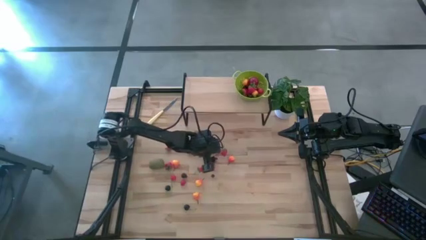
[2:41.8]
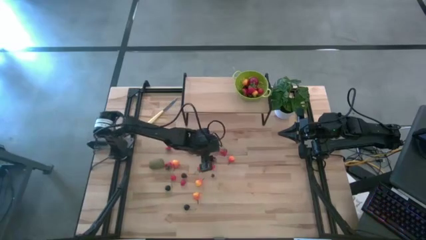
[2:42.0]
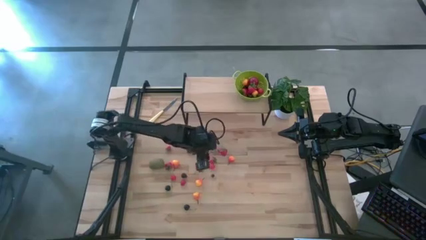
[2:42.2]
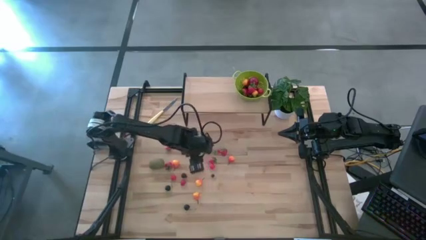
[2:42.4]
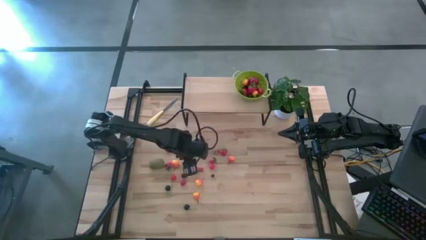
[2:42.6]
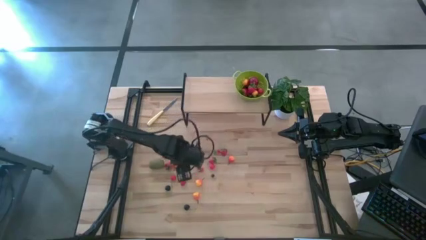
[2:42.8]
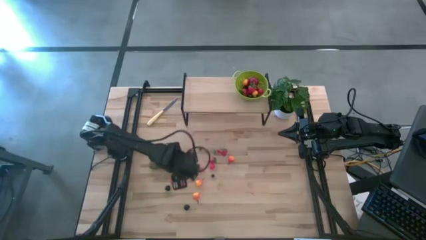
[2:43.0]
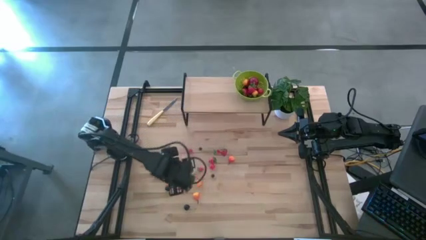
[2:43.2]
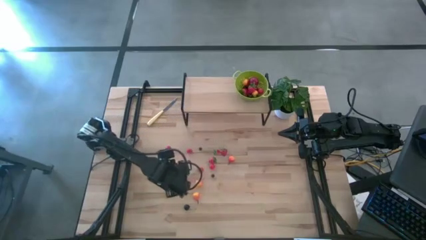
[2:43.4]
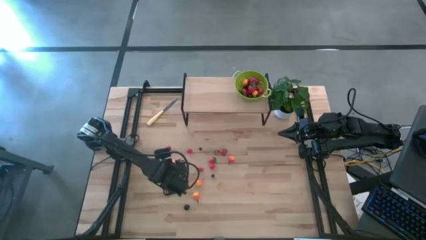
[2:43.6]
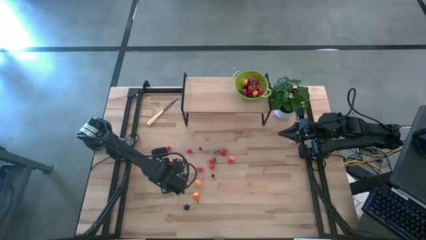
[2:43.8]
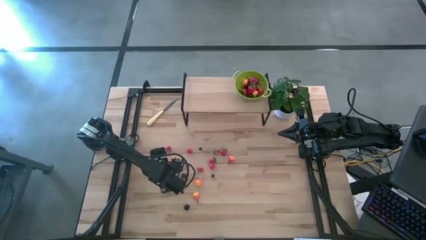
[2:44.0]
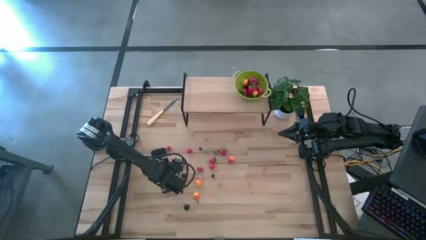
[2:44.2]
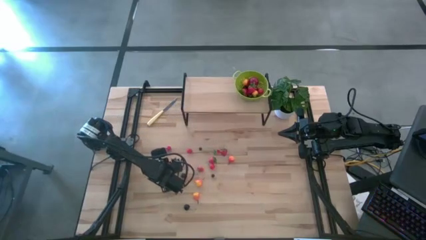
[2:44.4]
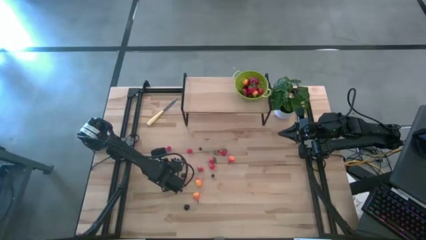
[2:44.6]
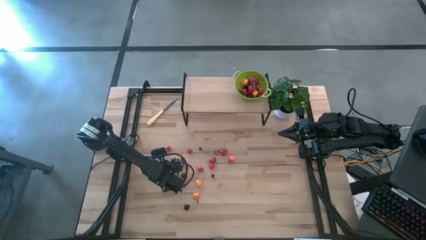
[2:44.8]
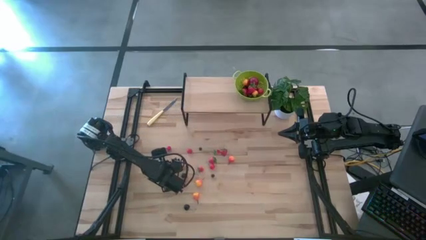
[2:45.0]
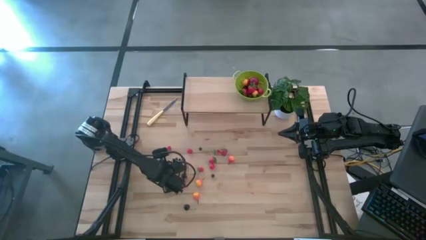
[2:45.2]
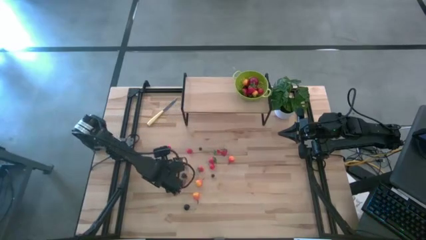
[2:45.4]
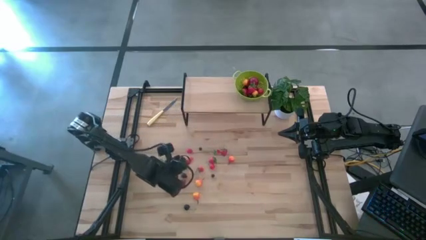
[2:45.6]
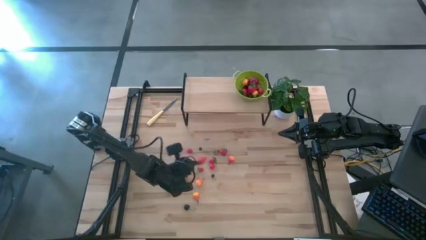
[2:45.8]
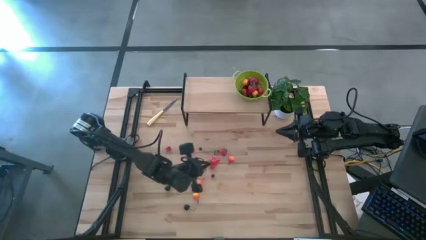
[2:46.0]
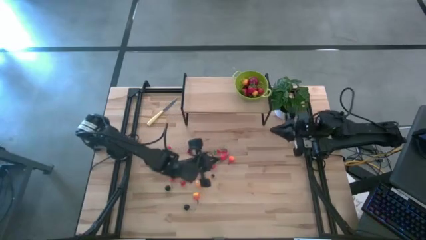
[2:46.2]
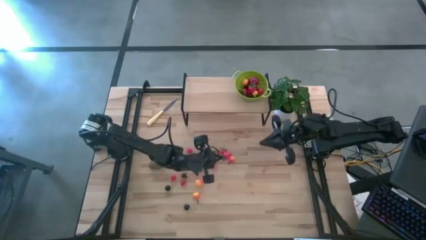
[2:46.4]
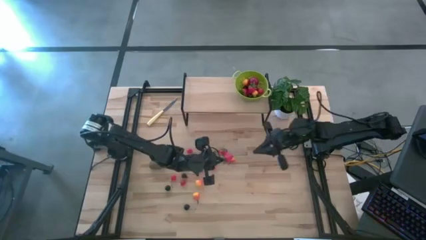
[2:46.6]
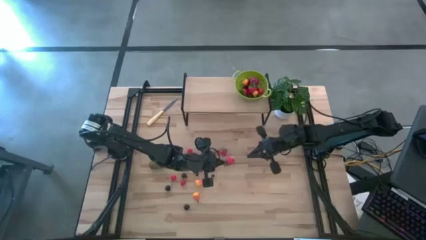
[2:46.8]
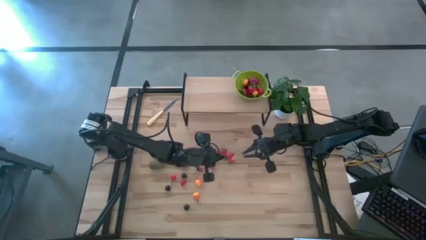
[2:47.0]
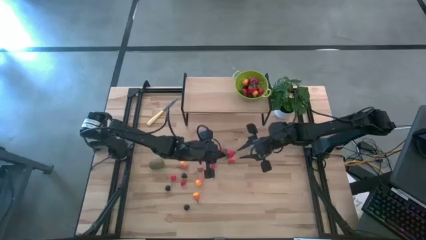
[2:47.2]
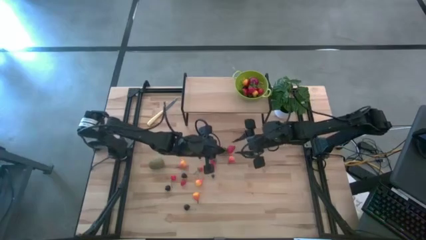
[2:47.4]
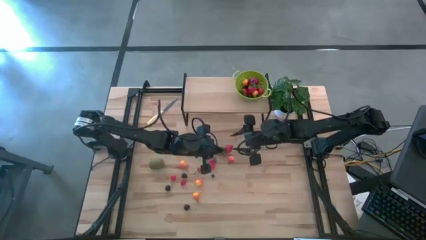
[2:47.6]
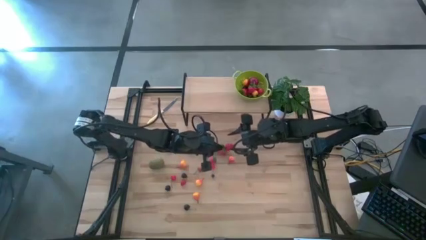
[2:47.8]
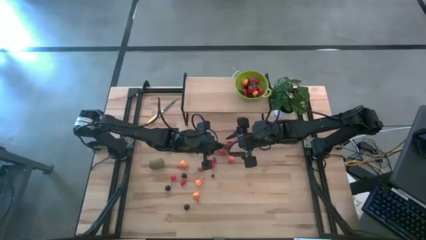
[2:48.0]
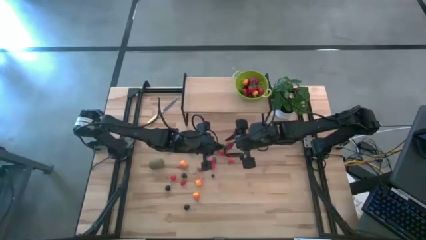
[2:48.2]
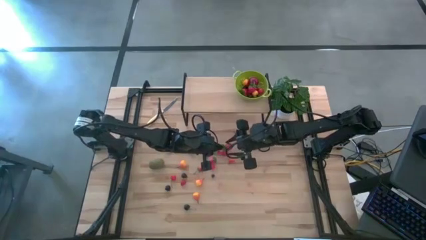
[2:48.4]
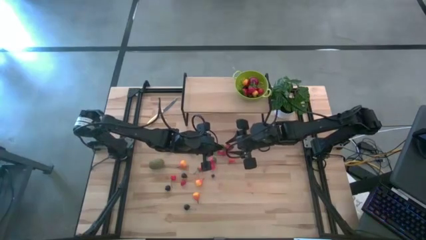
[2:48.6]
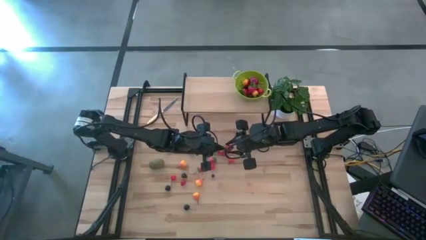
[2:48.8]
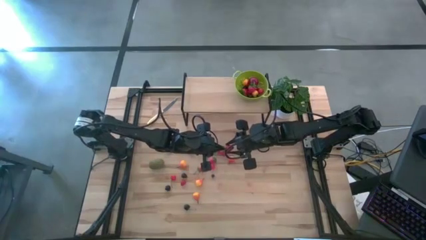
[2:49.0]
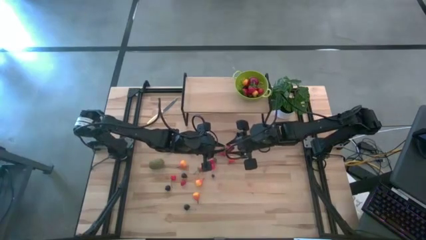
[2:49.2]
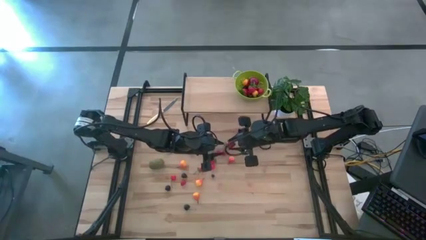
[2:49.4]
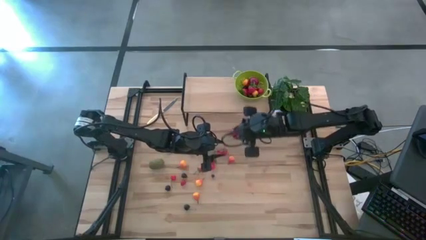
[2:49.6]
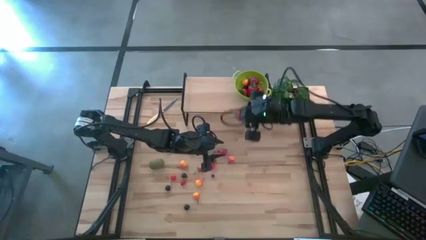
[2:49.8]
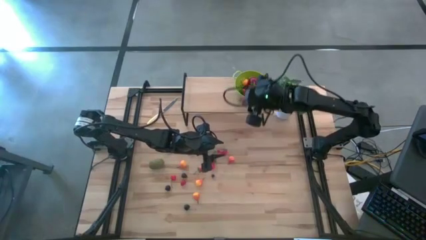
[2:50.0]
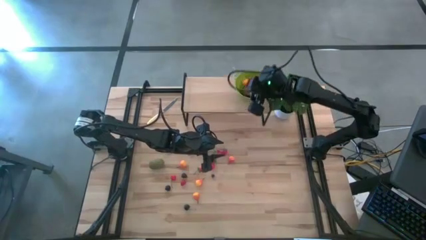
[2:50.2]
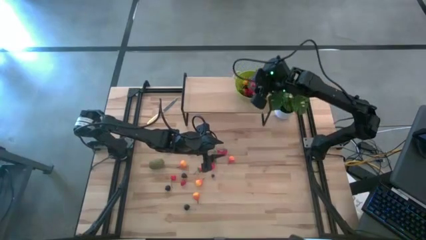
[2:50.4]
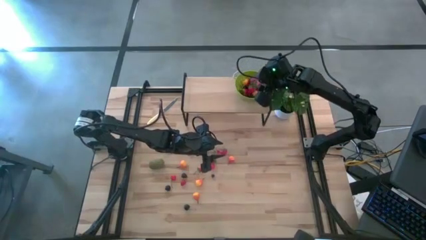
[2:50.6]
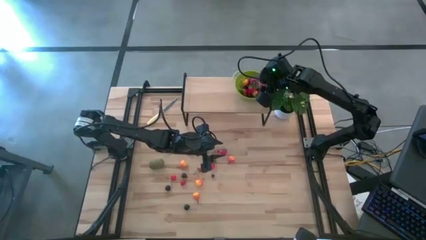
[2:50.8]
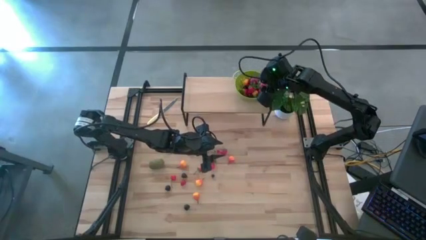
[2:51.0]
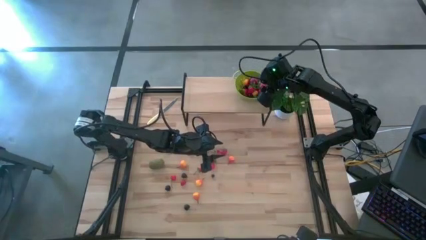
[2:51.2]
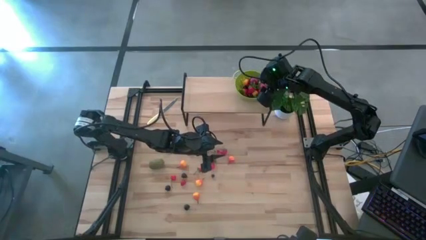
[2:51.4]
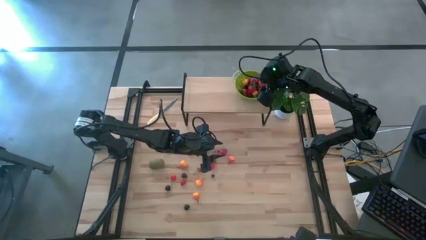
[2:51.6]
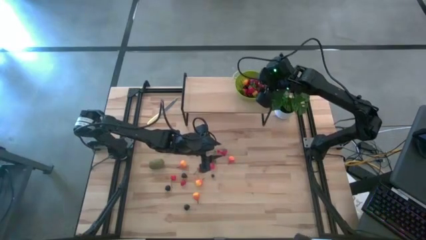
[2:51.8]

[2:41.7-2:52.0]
Task: Build produce basket
Put the strawberry into the green basket

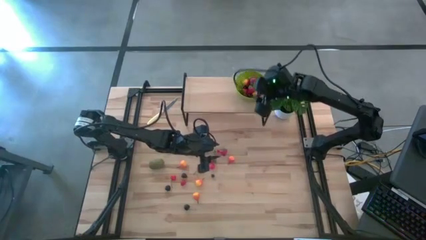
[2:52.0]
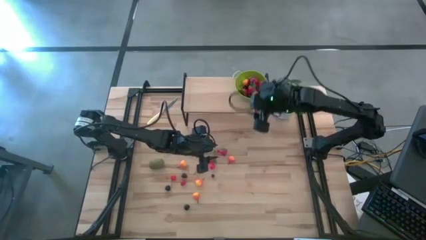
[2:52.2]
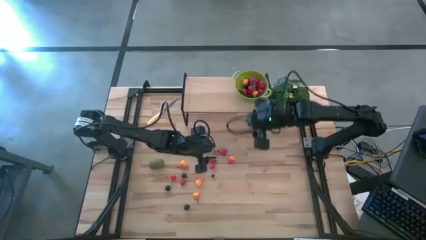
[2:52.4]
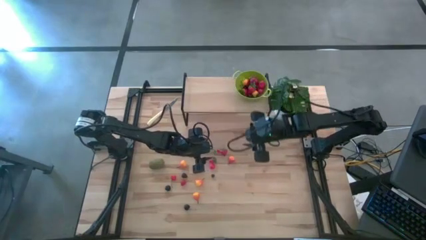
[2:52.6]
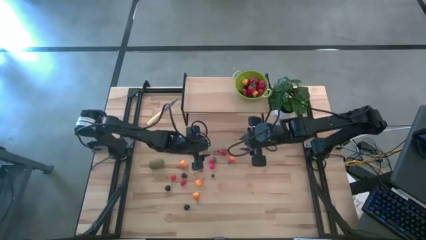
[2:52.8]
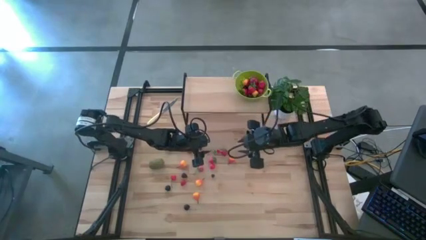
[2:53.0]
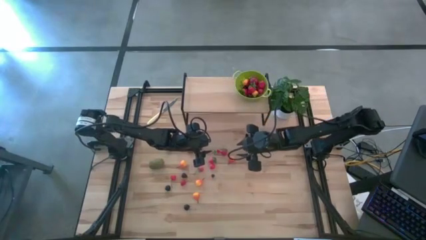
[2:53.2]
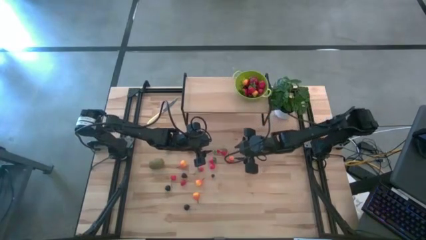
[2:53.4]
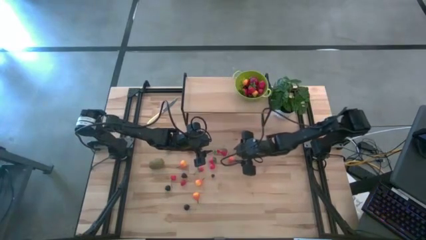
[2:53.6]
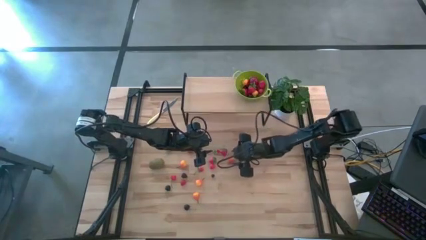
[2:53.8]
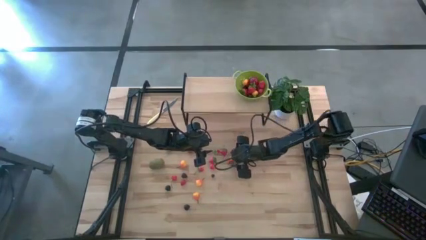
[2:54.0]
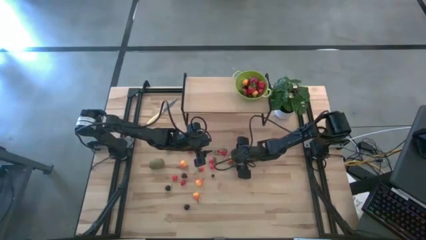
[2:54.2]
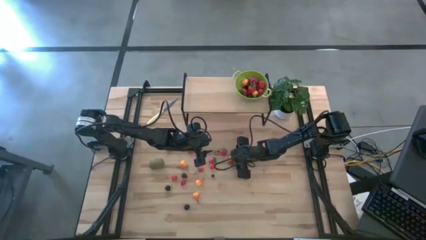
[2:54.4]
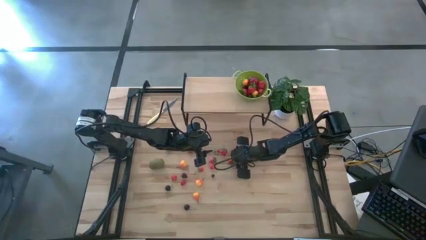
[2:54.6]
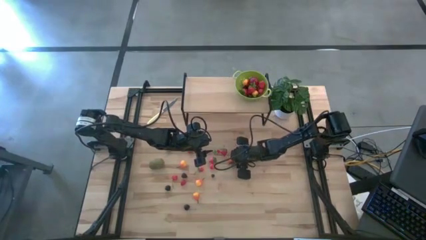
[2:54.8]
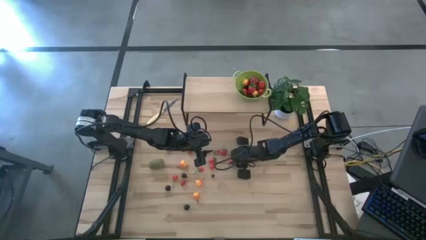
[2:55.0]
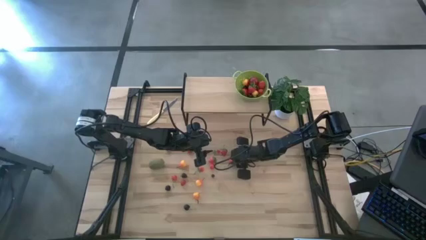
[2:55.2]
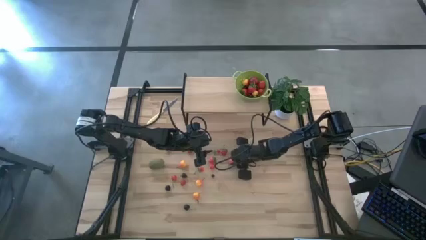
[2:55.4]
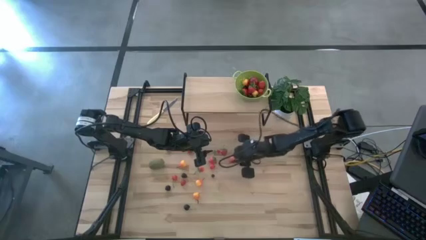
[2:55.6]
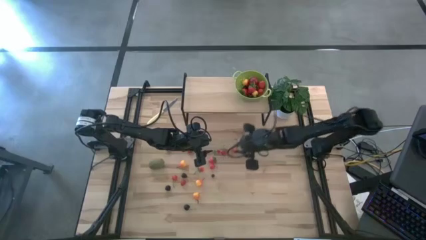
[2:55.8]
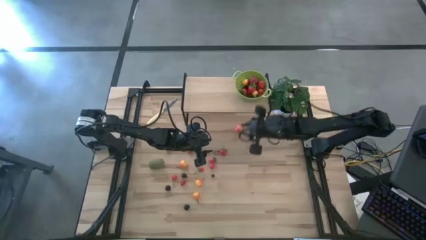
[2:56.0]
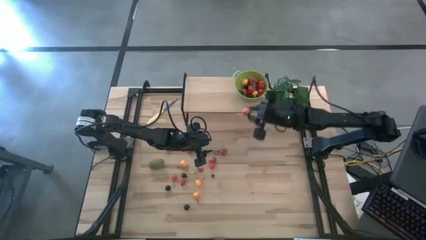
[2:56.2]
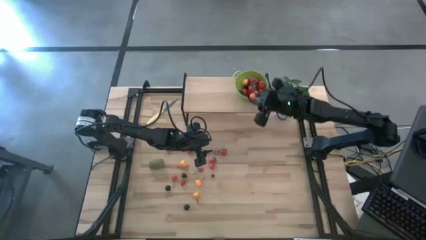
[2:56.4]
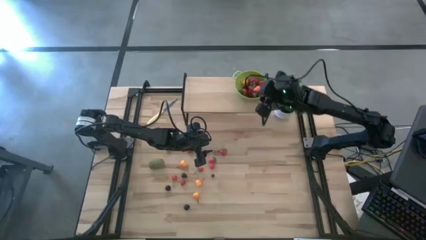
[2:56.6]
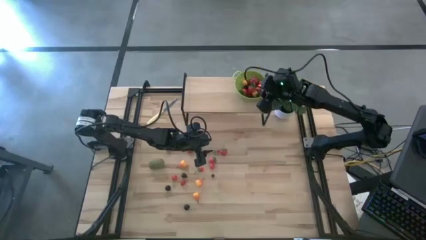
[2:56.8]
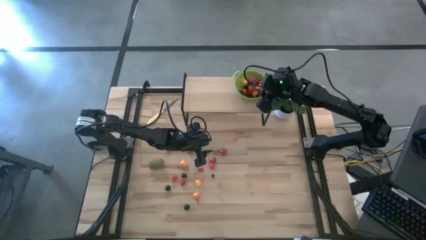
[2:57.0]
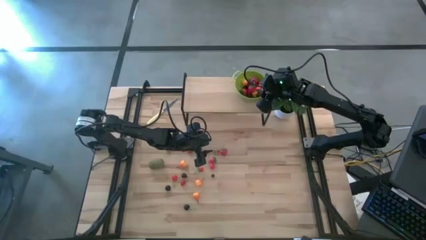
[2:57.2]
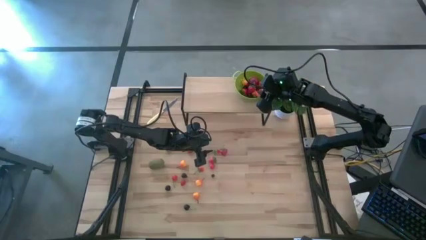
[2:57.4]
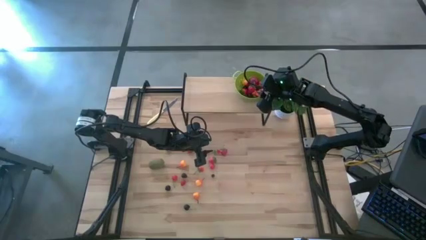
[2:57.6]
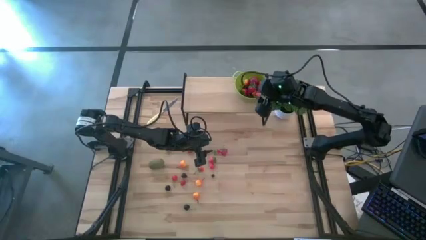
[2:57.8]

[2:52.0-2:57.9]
Put the pear into the green basket
